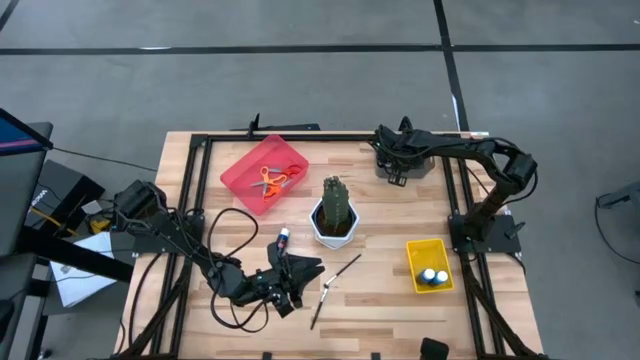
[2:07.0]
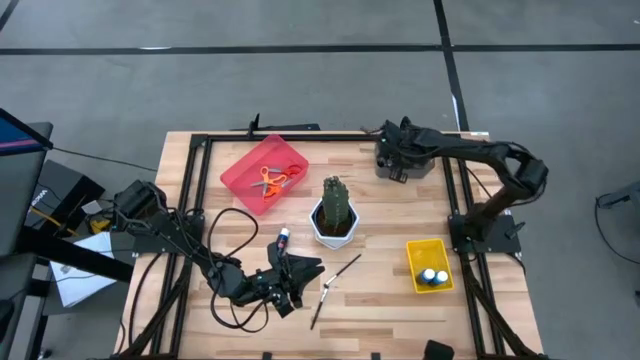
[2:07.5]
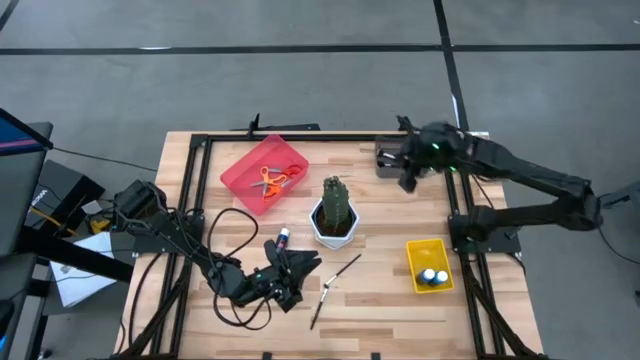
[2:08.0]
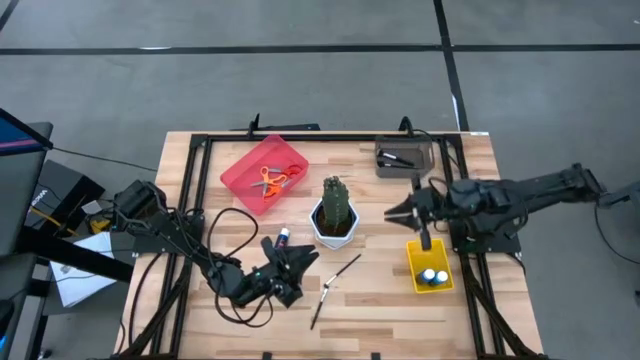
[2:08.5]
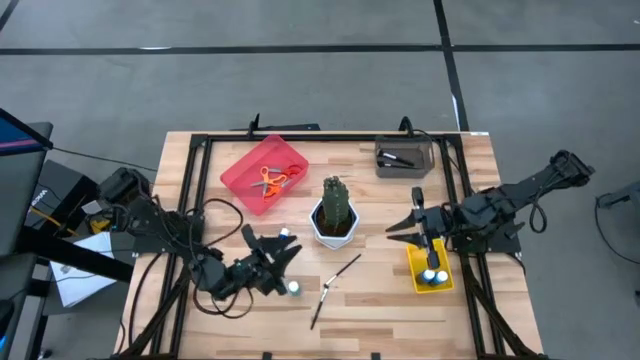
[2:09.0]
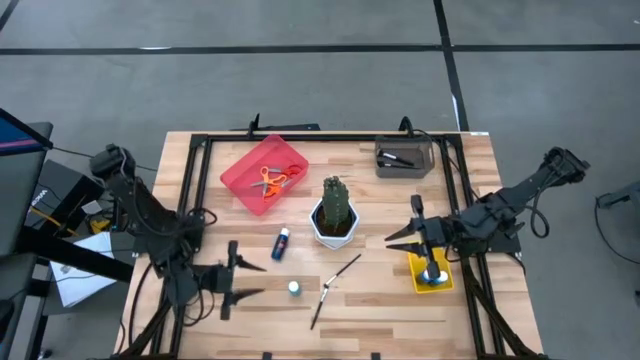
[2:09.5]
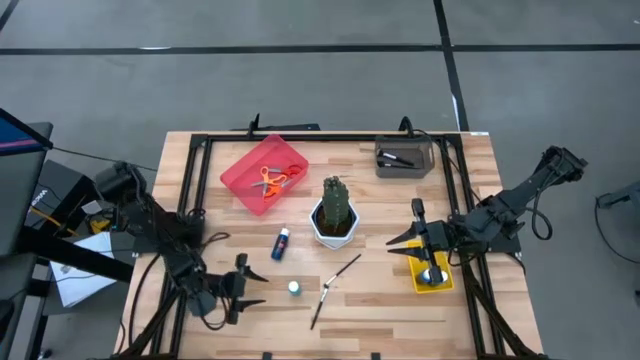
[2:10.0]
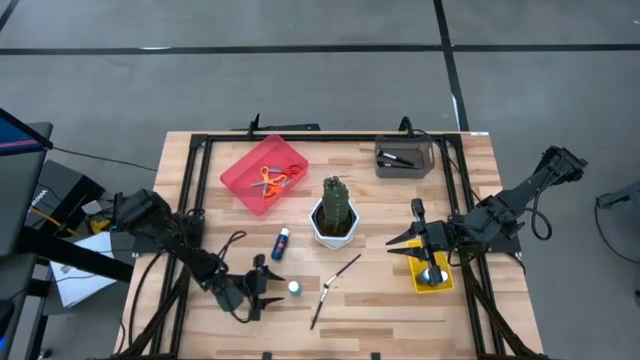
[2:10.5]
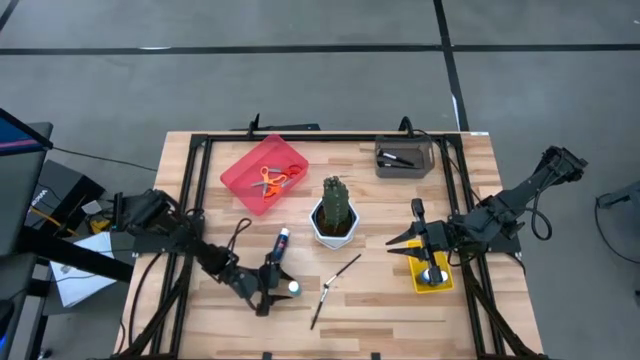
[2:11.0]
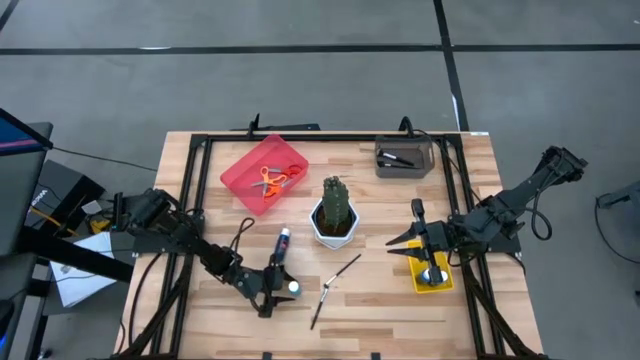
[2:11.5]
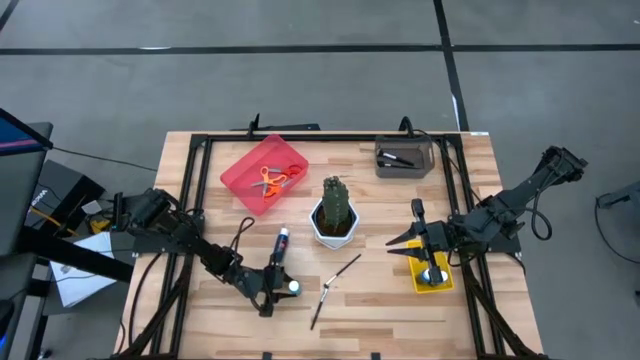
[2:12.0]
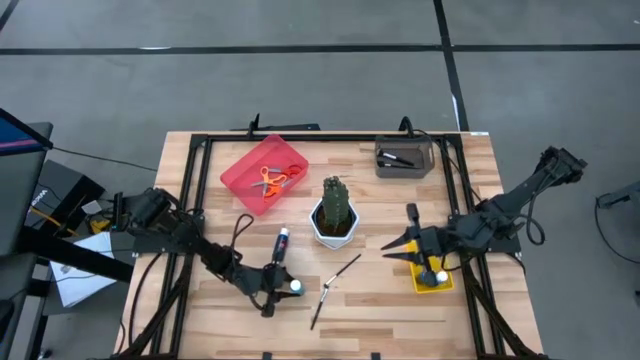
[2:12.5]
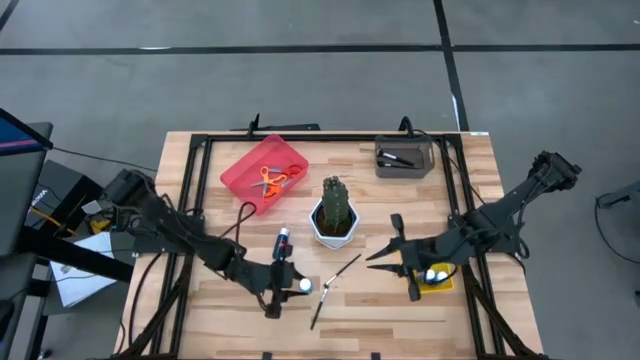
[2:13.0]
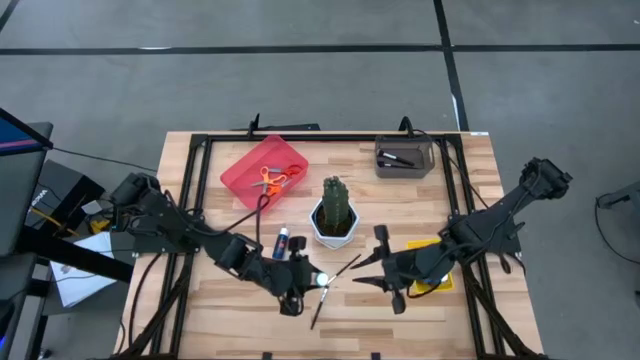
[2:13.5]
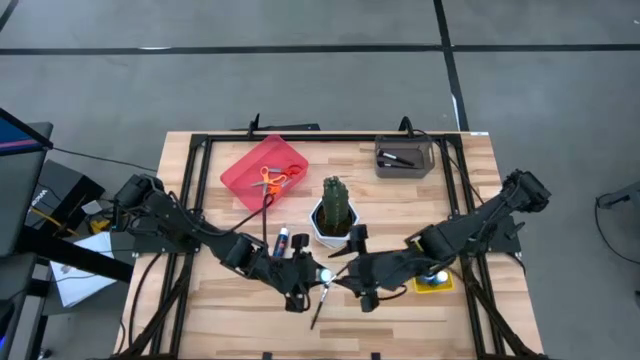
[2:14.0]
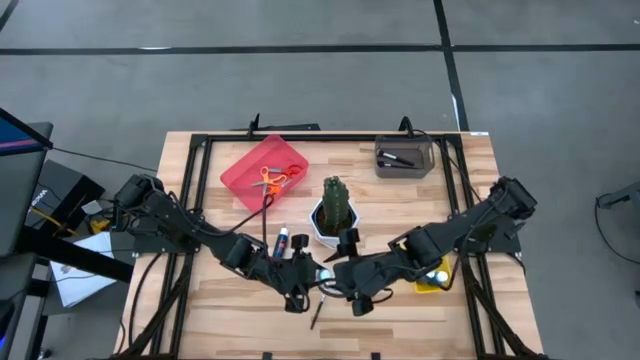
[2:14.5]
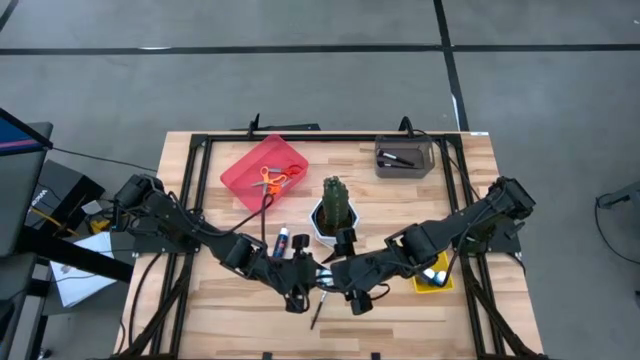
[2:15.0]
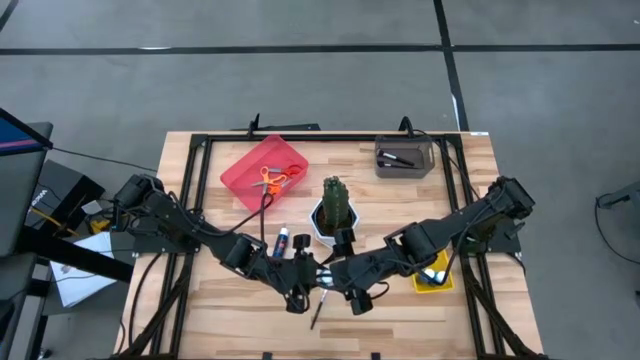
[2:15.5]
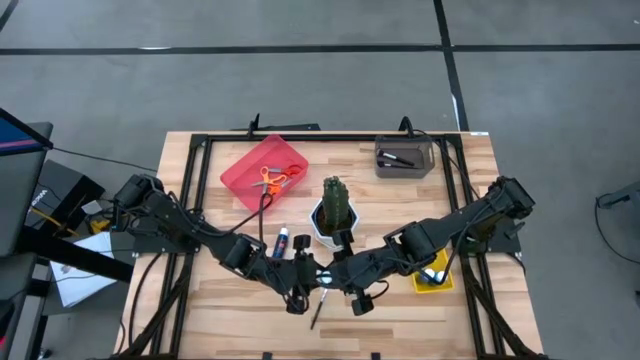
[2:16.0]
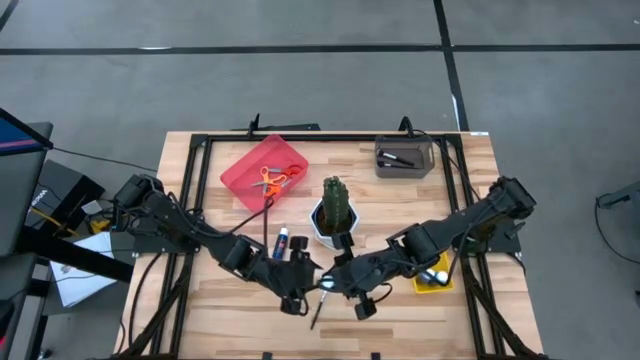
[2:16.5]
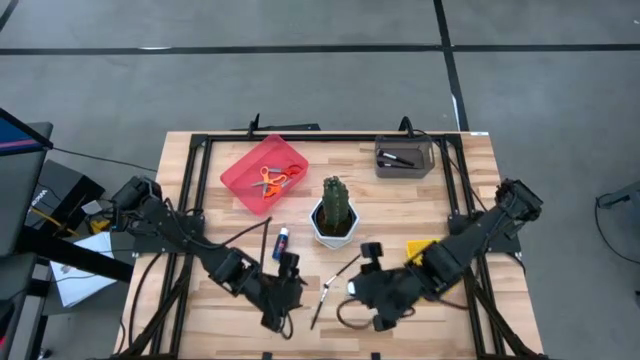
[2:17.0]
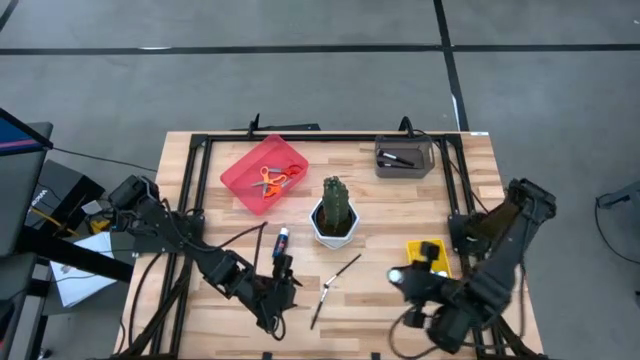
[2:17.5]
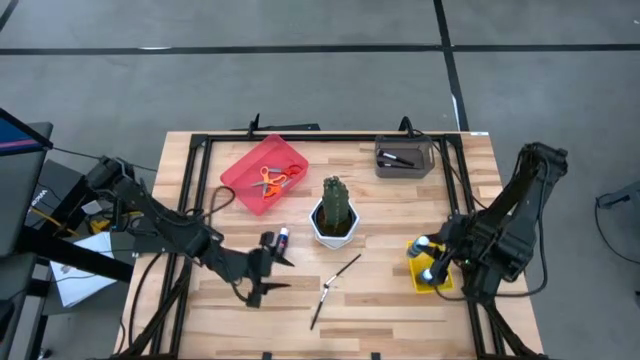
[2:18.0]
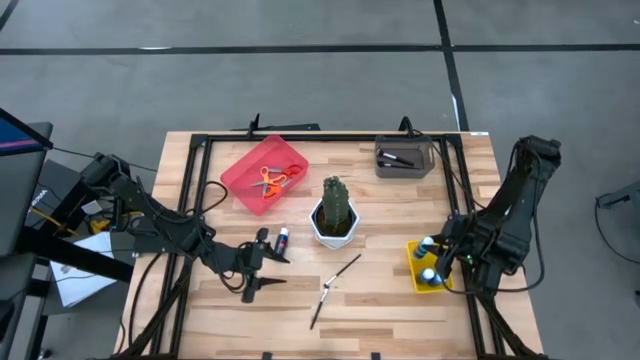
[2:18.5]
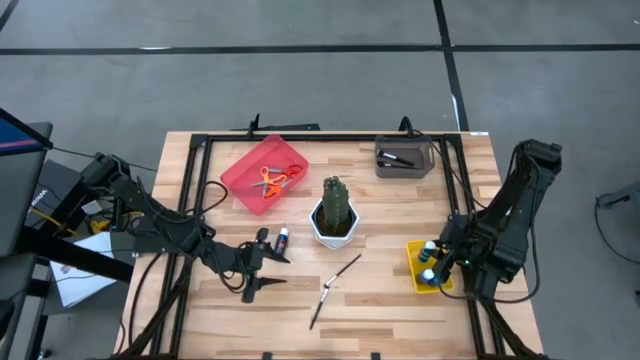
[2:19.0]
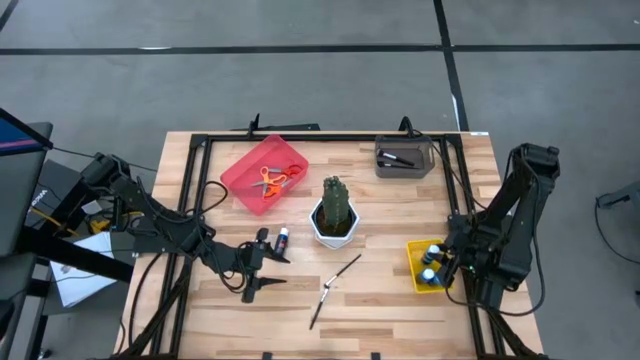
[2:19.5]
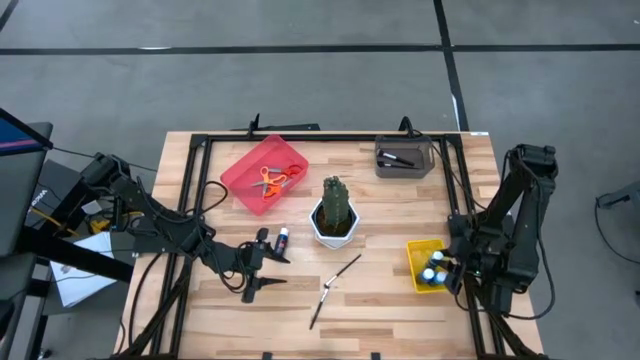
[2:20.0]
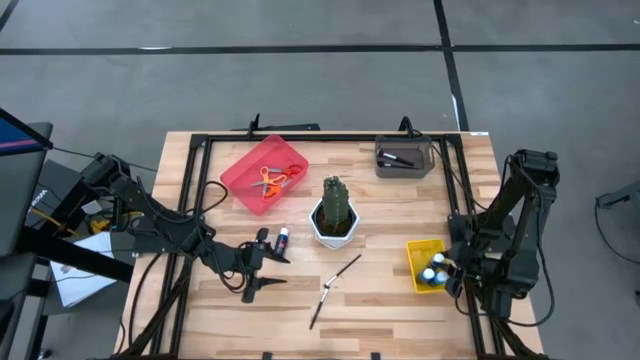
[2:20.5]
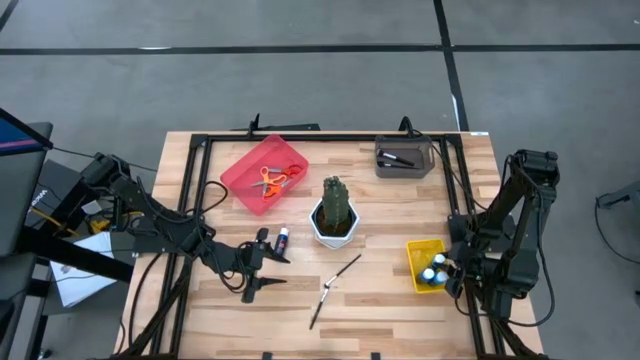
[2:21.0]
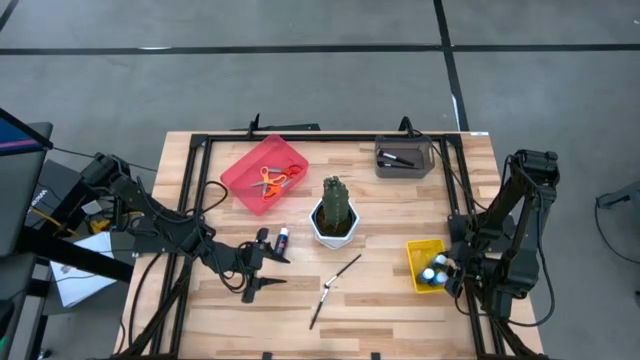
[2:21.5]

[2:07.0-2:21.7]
Task: Pick & Place Paint Supplies
Put the light blue paint bottle into the yellow basket

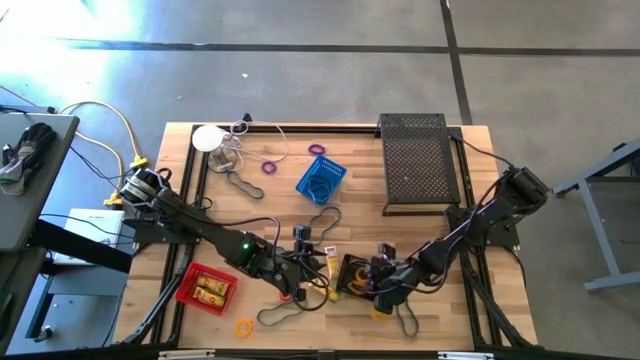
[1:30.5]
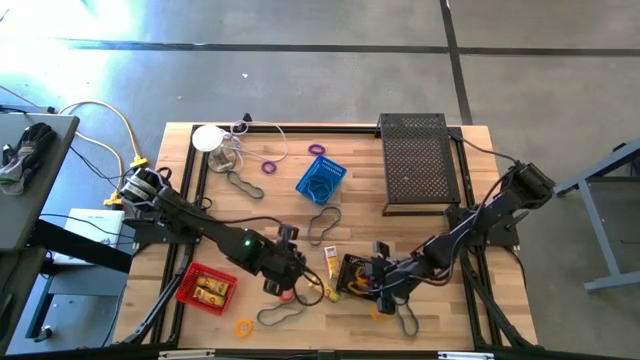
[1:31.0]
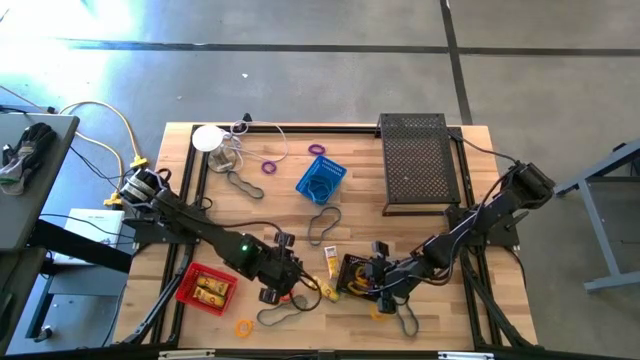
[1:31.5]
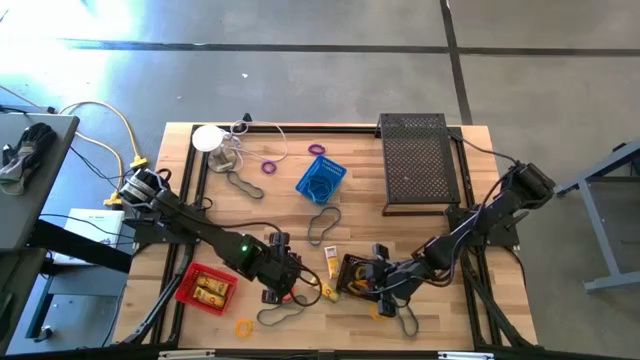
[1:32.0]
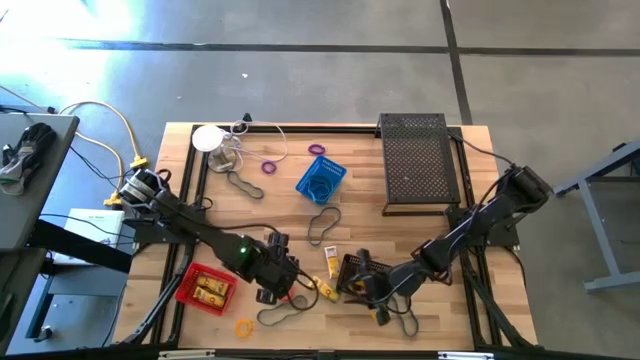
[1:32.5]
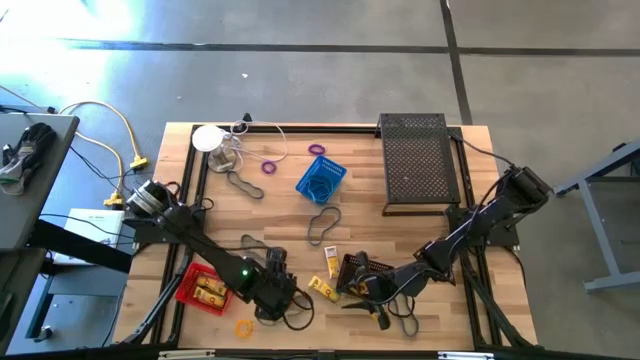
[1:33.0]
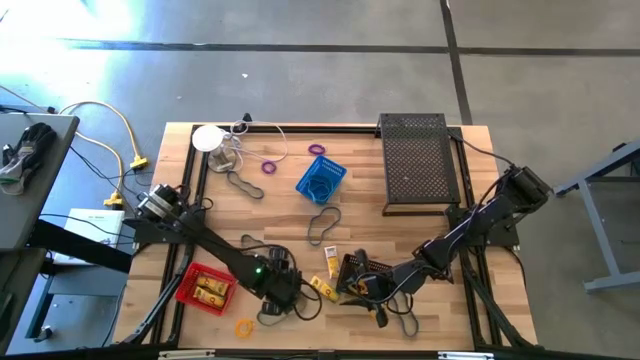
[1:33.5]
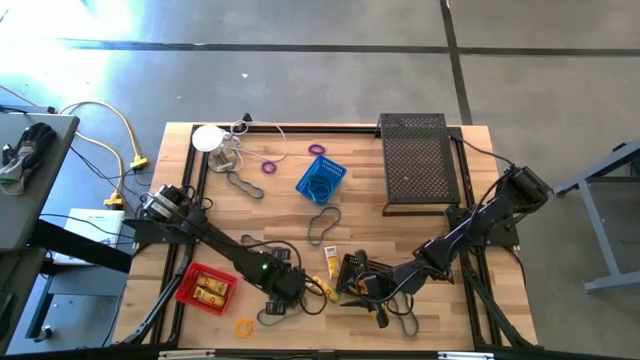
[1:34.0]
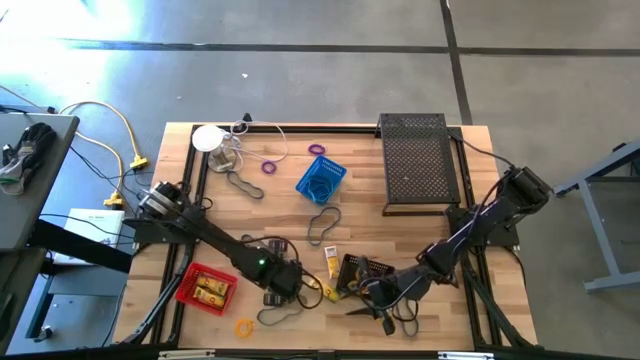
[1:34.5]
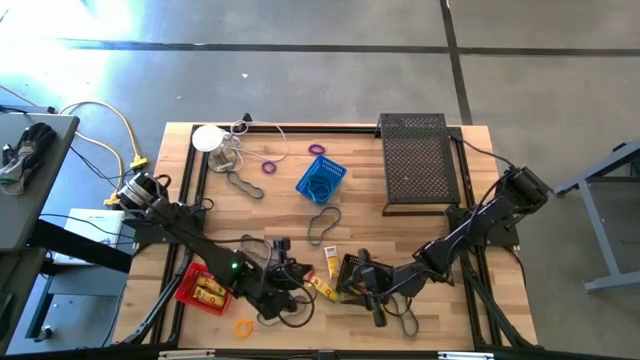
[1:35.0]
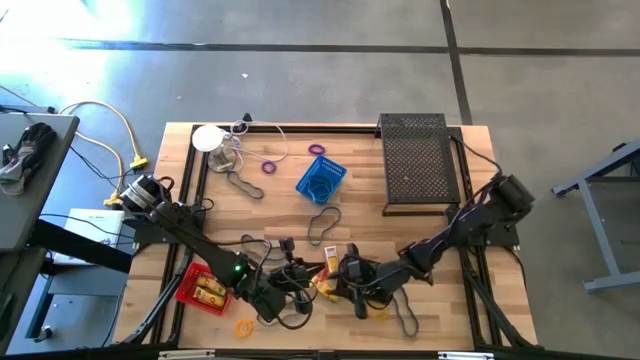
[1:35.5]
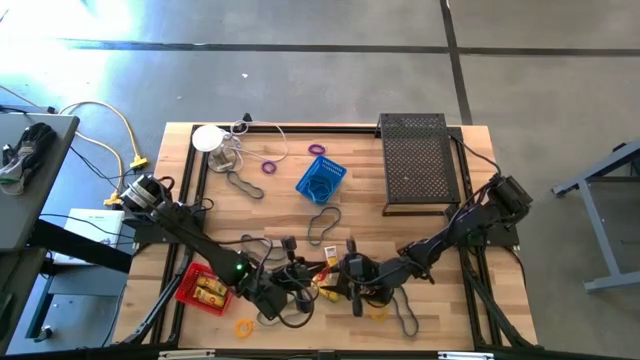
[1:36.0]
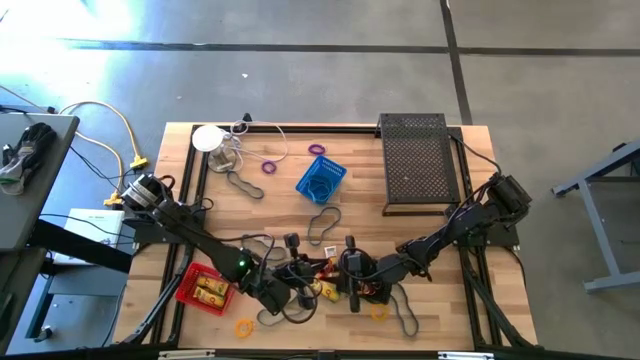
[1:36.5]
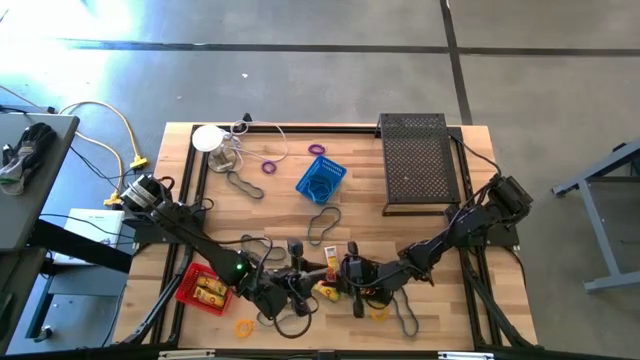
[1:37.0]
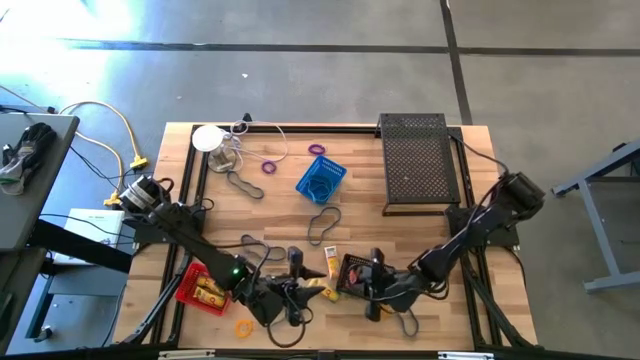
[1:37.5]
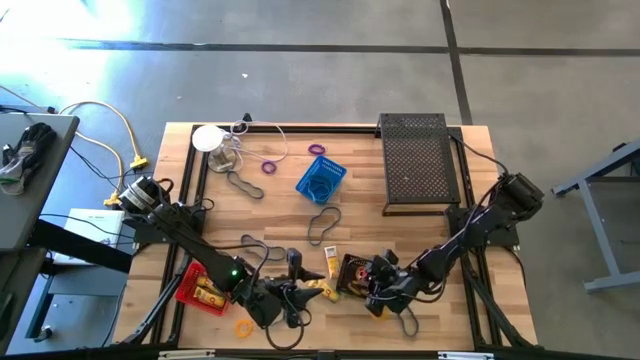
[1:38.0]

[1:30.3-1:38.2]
Task: Pick & Place Office Desk Supplies
Put the orange wrist coil keychain into the black bin
